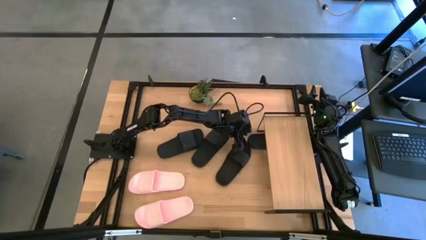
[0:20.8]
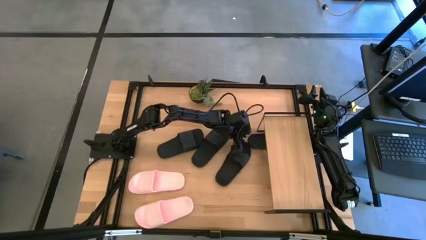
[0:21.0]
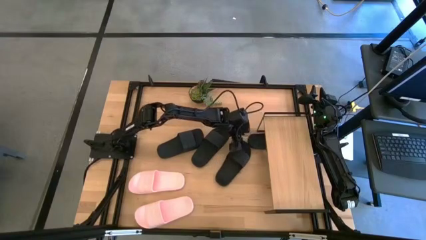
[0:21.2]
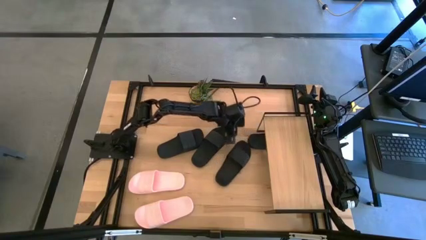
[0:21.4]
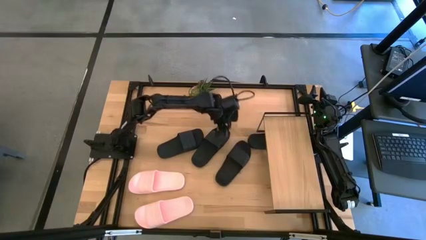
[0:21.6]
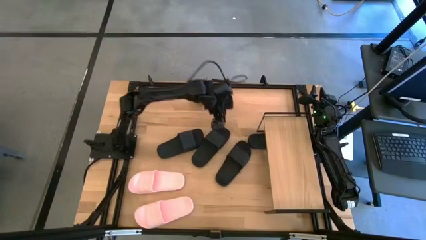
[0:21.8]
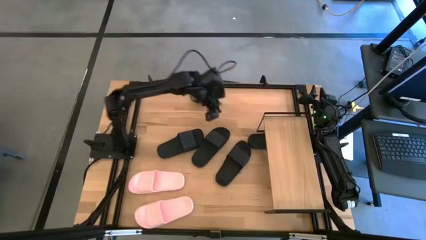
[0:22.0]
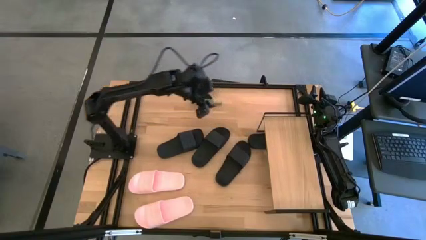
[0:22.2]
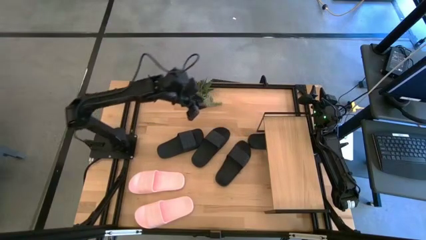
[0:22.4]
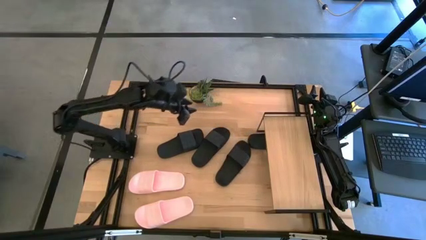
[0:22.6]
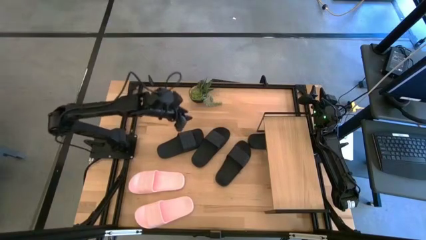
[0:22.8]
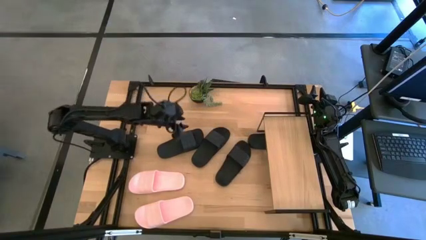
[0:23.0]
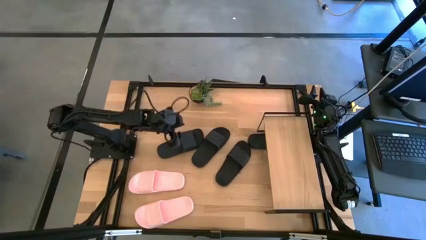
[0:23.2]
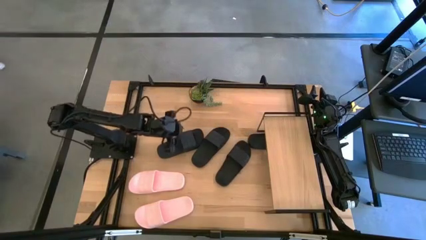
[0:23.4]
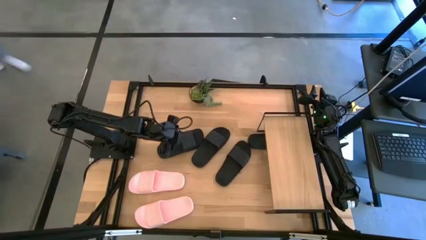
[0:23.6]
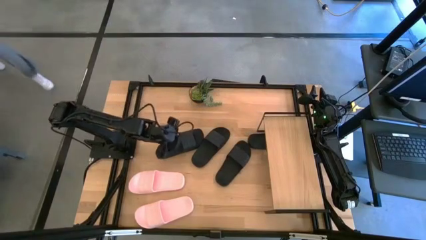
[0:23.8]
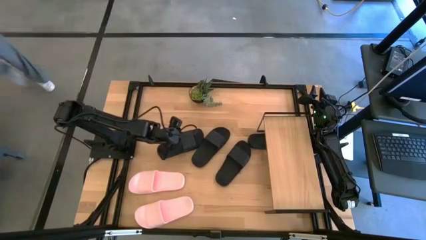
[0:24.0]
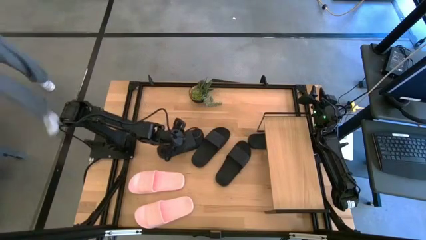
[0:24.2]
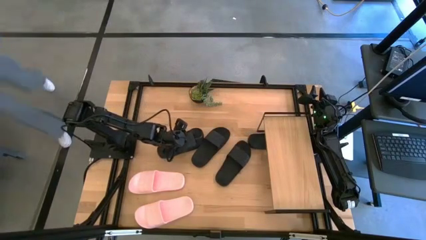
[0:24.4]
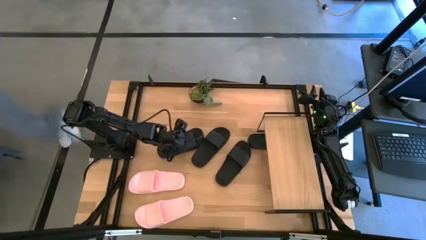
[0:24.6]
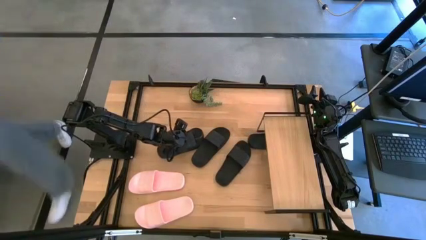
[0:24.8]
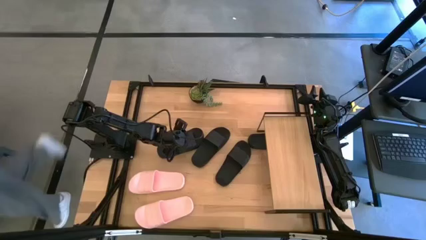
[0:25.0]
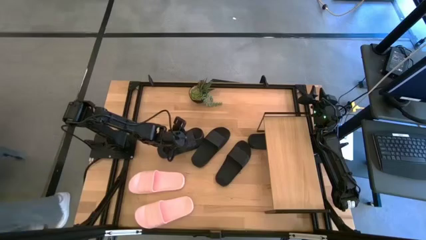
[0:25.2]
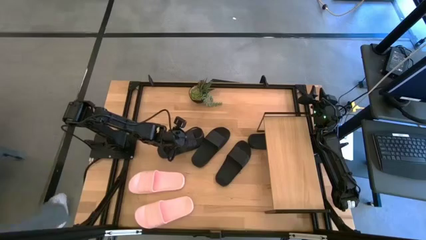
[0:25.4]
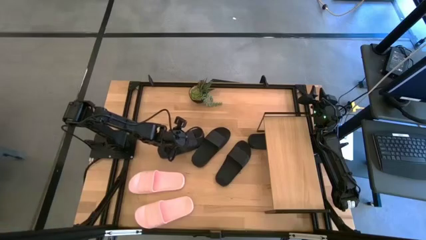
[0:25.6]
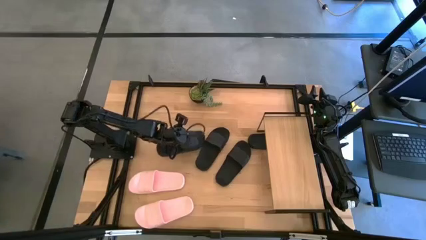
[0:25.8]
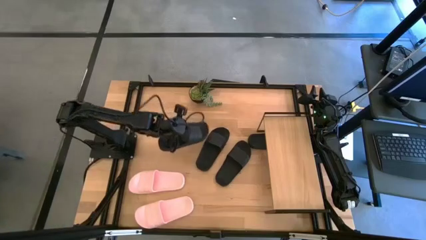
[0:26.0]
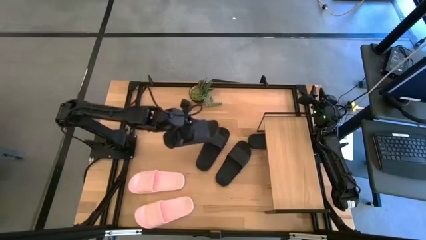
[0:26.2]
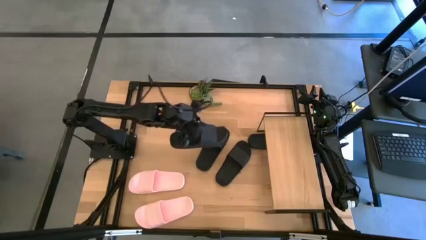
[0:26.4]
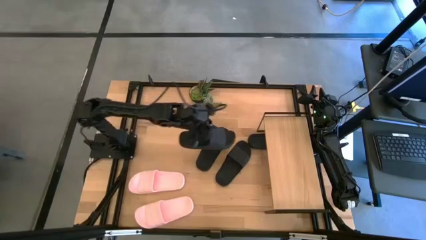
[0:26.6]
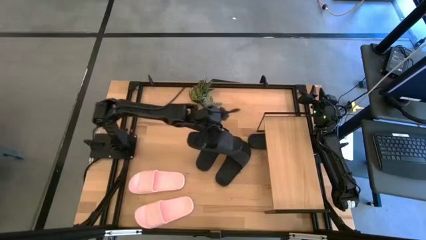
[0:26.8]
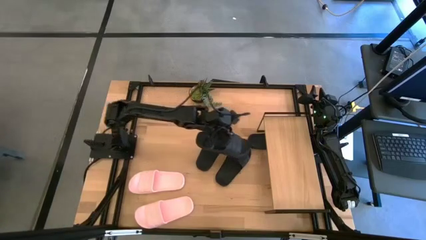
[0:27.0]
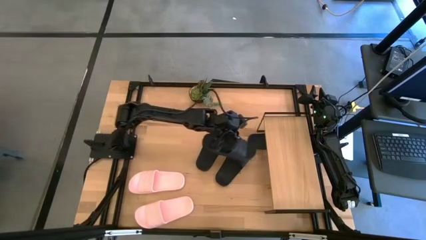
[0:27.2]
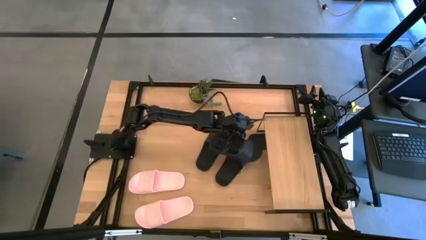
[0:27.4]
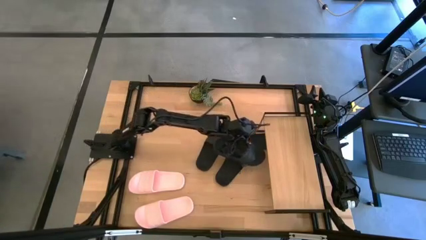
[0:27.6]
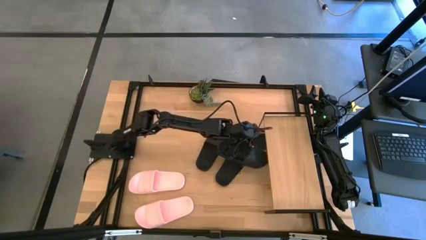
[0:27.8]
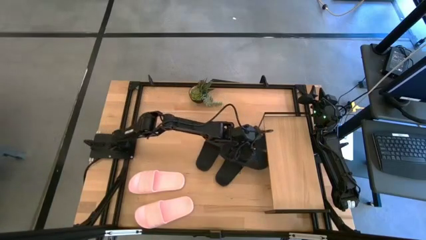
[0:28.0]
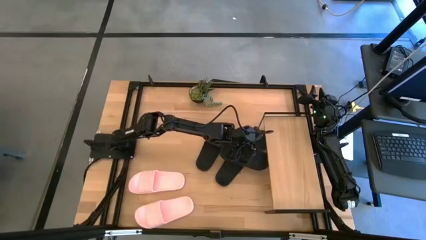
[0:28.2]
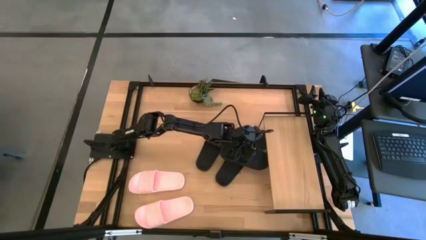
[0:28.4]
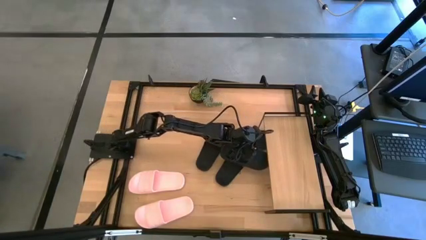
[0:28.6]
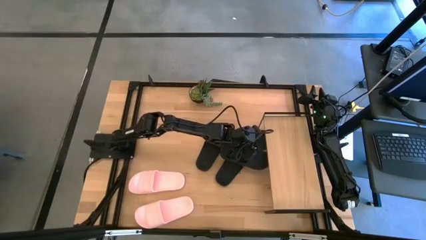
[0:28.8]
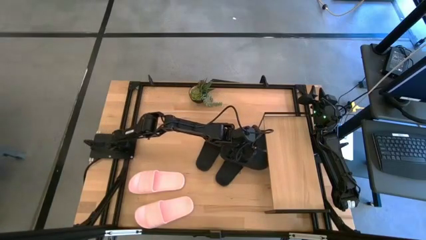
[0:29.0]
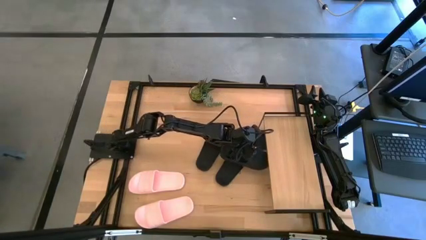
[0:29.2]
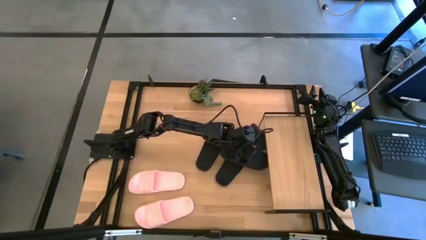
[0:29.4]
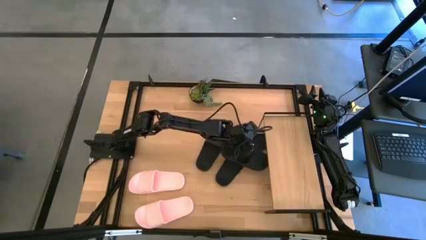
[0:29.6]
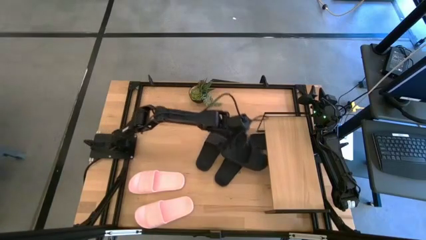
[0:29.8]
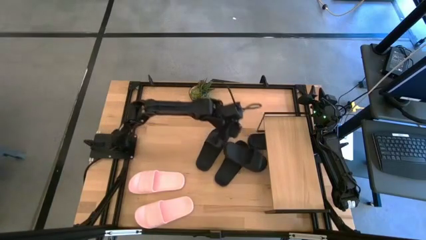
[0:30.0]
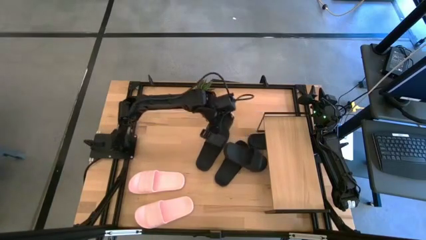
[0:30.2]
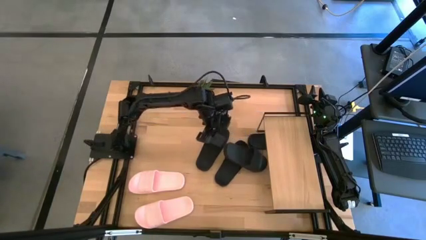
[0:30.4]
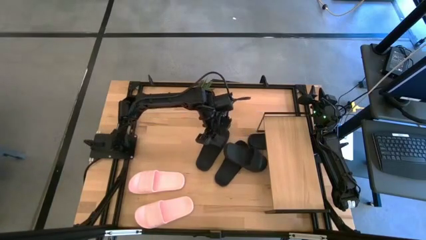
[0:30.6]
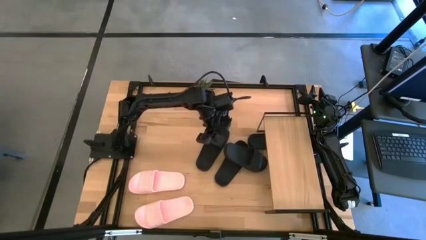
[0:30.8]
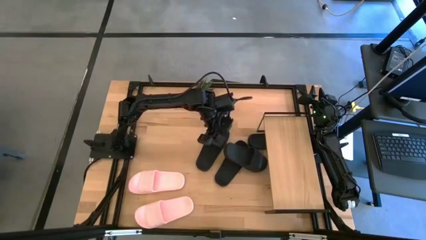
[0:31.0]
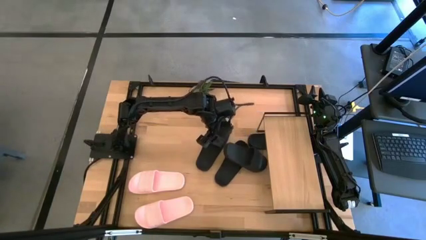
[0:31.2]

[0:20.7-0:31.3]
Task: Pick and place slides into the shelf
Put the black slides under the shelf
